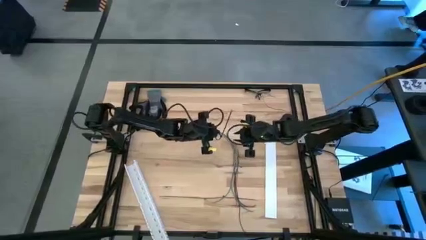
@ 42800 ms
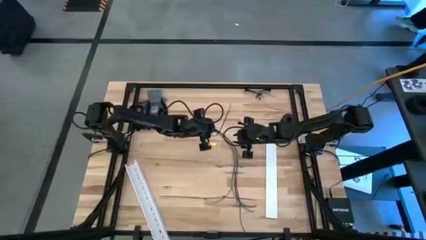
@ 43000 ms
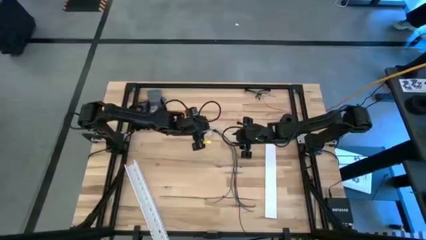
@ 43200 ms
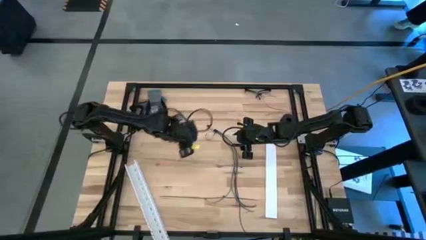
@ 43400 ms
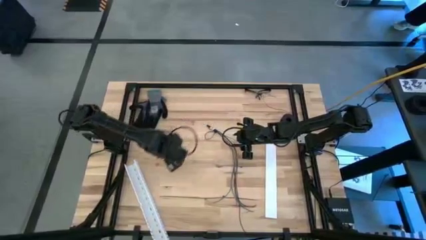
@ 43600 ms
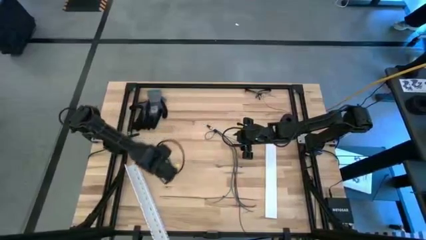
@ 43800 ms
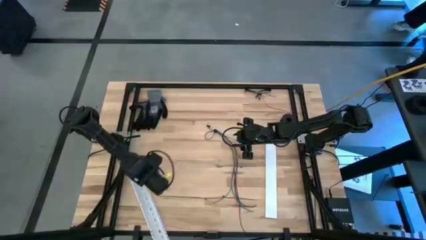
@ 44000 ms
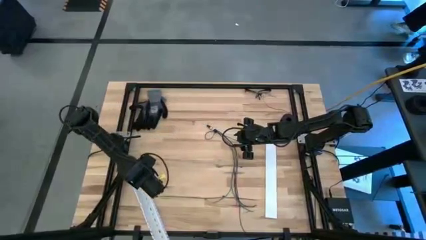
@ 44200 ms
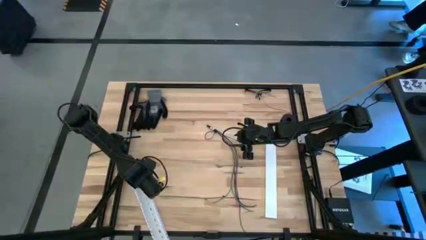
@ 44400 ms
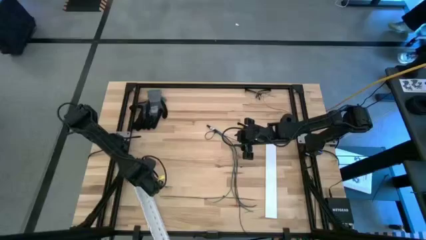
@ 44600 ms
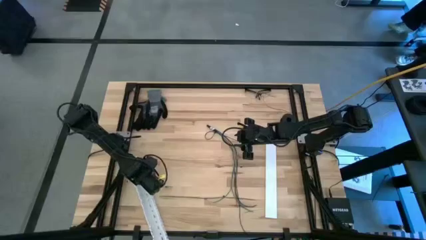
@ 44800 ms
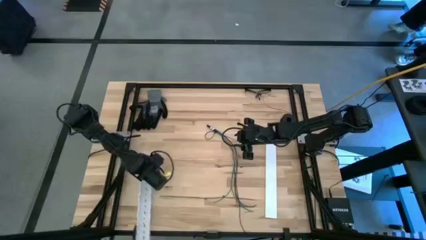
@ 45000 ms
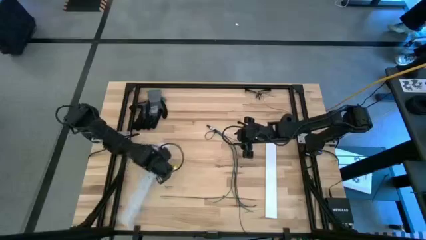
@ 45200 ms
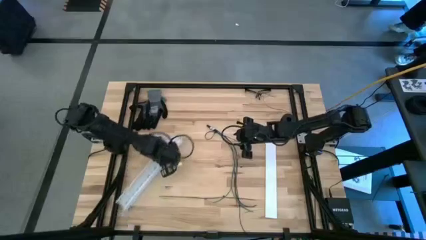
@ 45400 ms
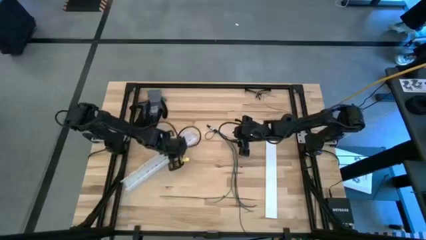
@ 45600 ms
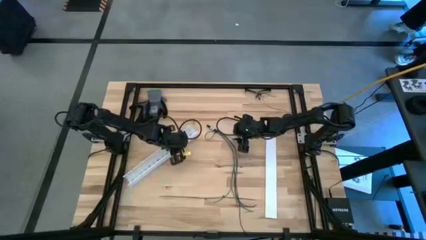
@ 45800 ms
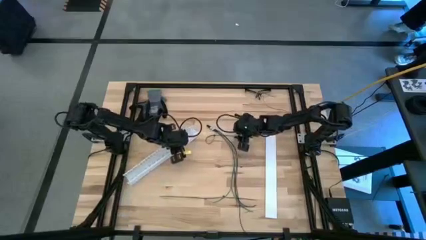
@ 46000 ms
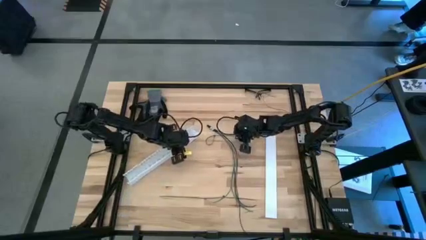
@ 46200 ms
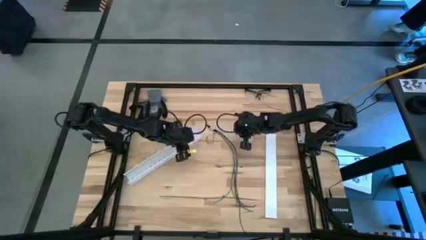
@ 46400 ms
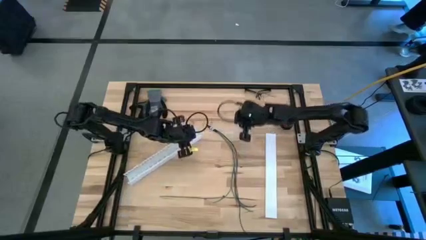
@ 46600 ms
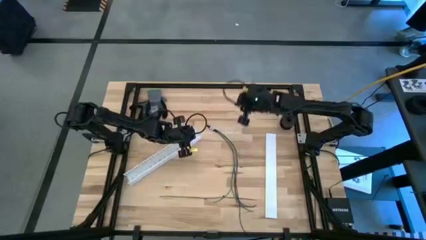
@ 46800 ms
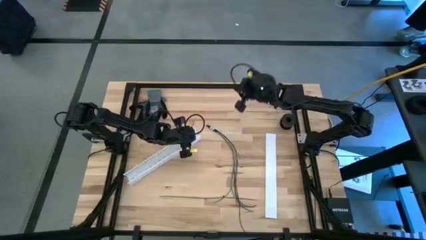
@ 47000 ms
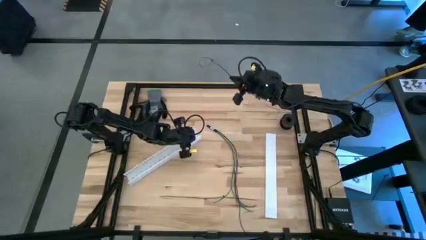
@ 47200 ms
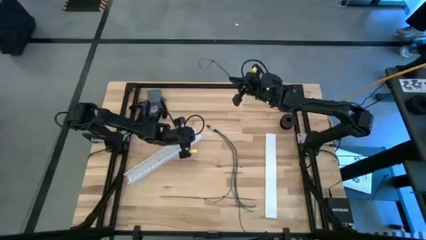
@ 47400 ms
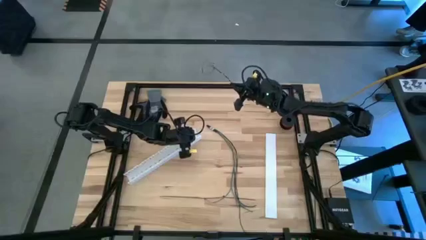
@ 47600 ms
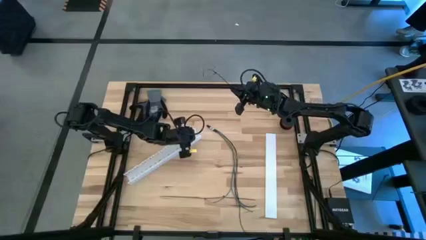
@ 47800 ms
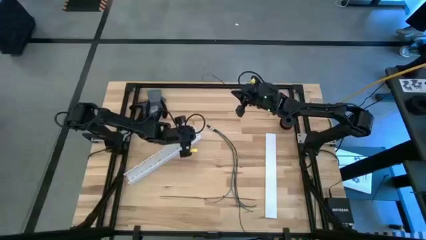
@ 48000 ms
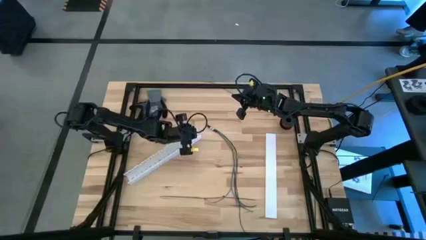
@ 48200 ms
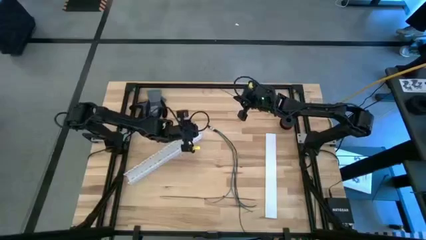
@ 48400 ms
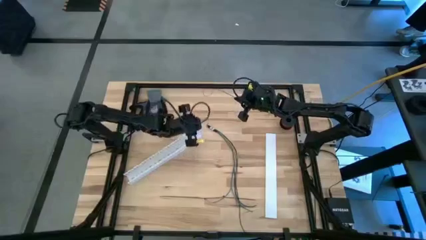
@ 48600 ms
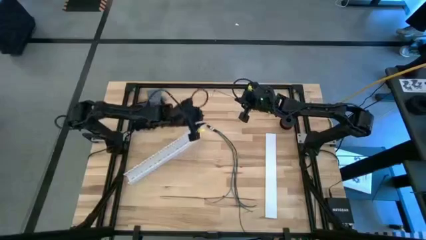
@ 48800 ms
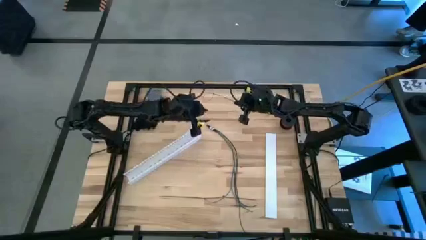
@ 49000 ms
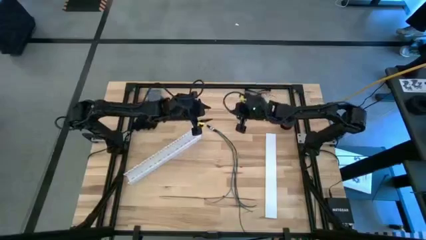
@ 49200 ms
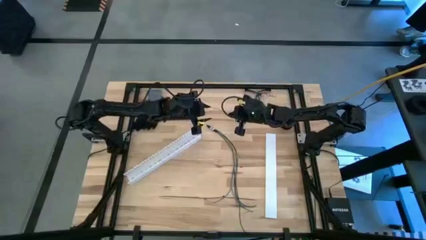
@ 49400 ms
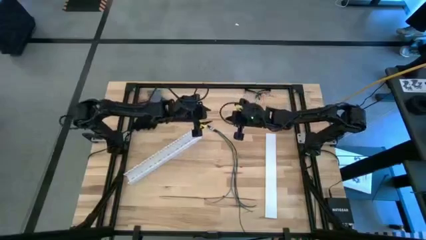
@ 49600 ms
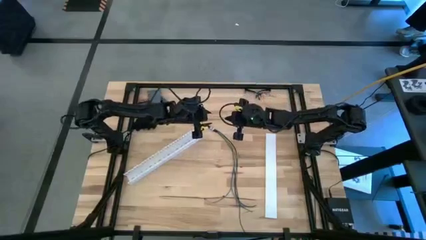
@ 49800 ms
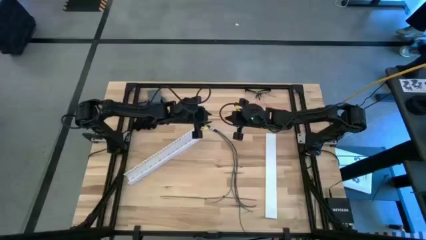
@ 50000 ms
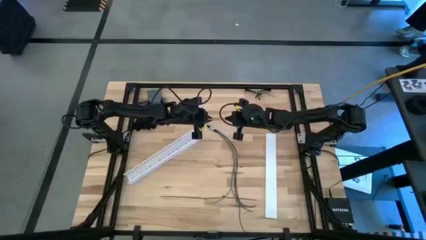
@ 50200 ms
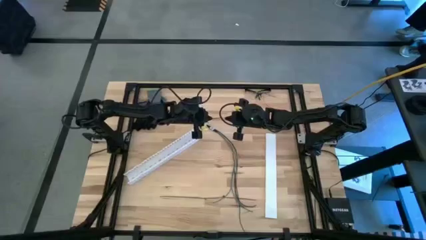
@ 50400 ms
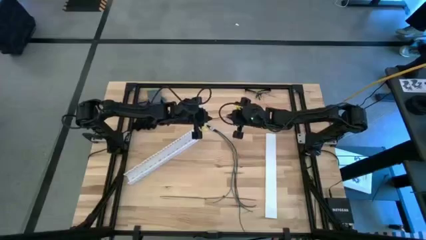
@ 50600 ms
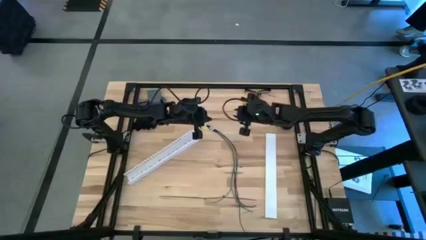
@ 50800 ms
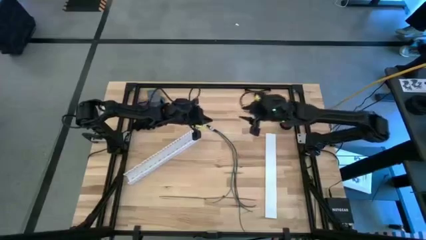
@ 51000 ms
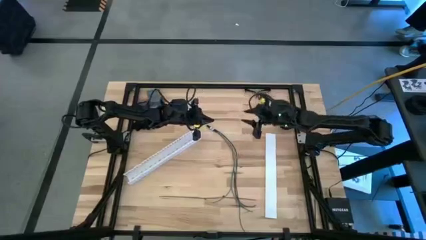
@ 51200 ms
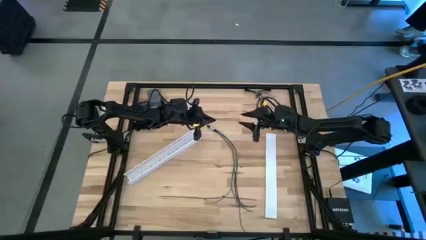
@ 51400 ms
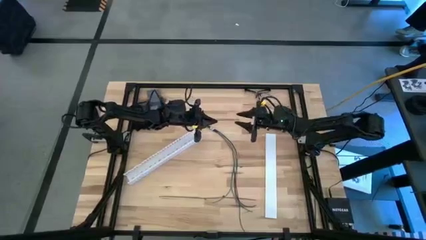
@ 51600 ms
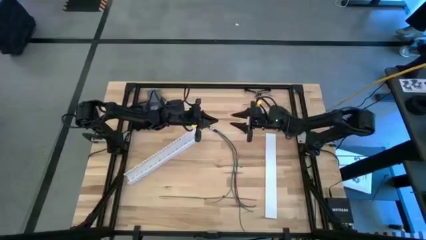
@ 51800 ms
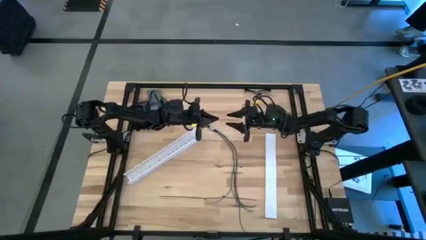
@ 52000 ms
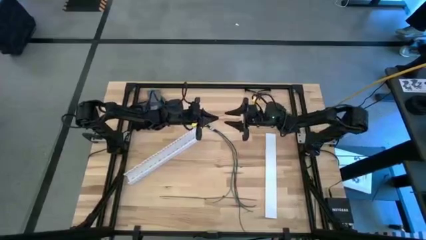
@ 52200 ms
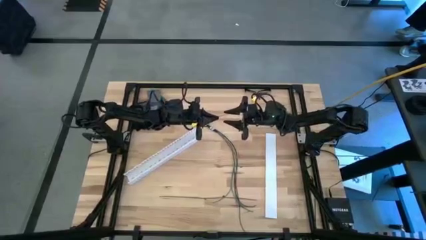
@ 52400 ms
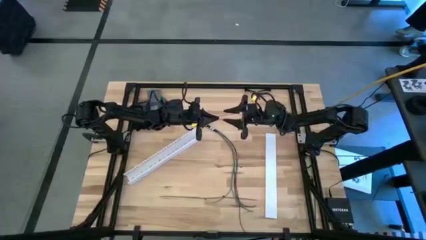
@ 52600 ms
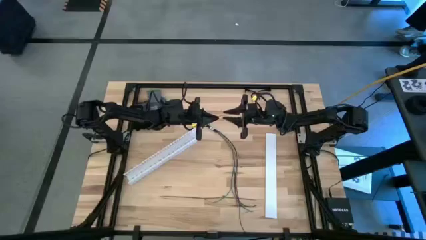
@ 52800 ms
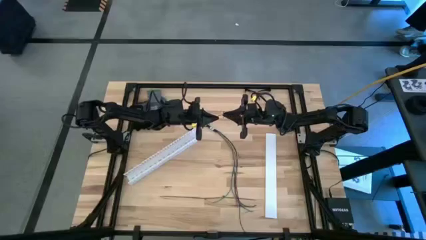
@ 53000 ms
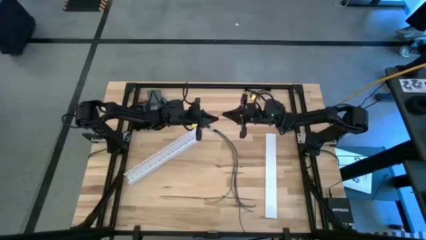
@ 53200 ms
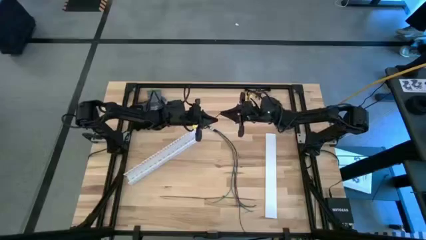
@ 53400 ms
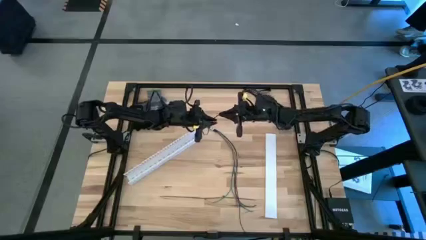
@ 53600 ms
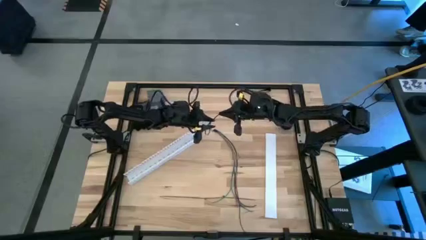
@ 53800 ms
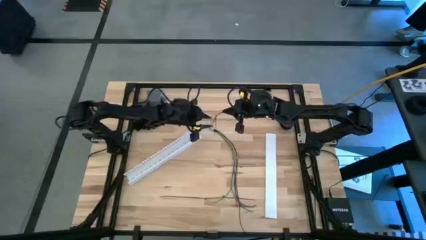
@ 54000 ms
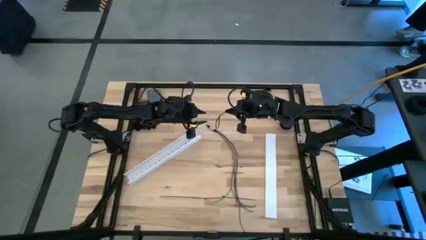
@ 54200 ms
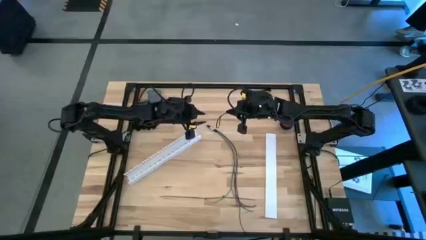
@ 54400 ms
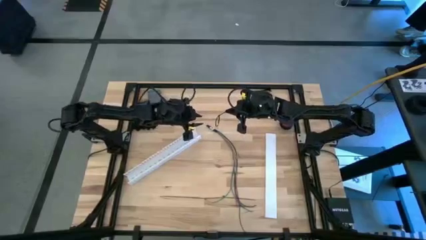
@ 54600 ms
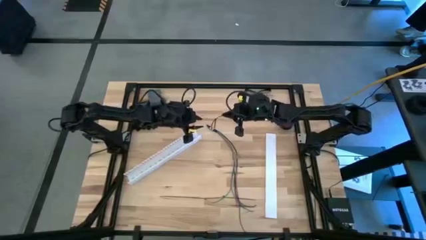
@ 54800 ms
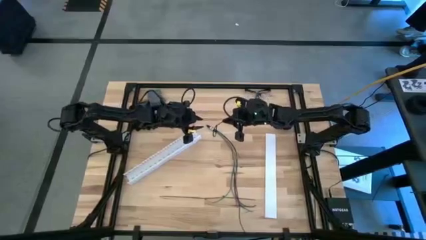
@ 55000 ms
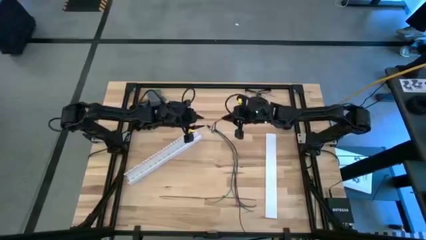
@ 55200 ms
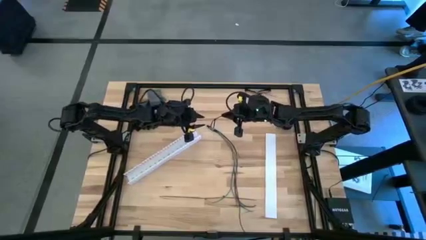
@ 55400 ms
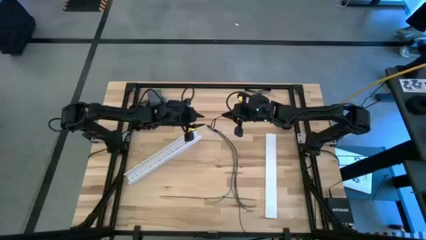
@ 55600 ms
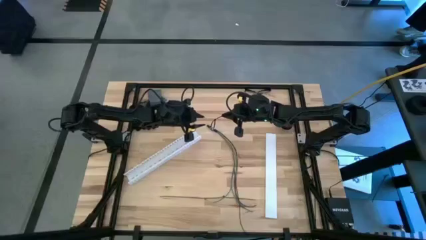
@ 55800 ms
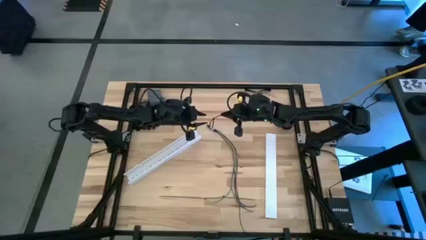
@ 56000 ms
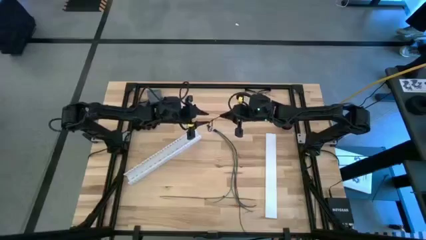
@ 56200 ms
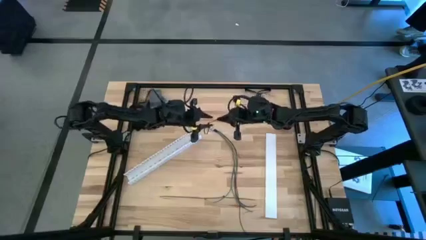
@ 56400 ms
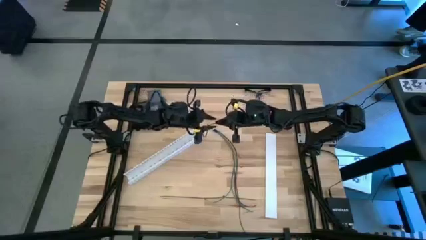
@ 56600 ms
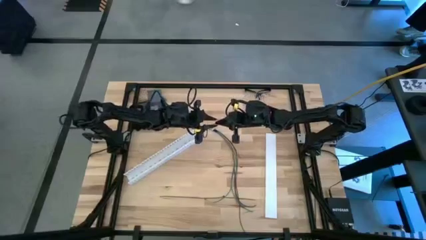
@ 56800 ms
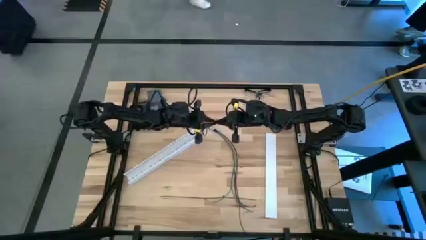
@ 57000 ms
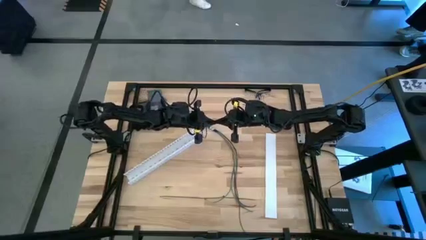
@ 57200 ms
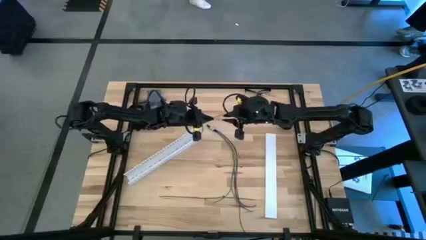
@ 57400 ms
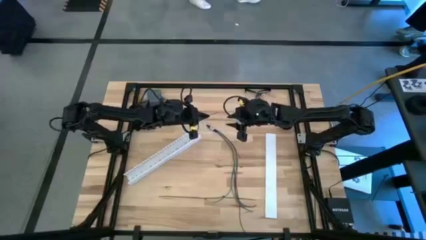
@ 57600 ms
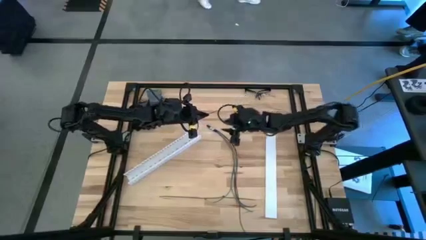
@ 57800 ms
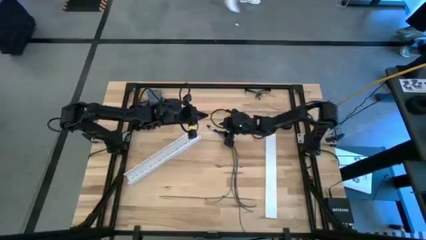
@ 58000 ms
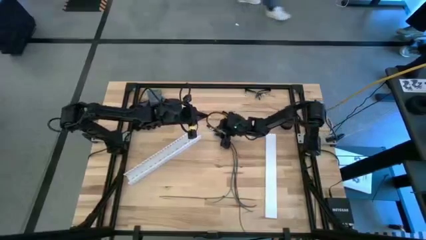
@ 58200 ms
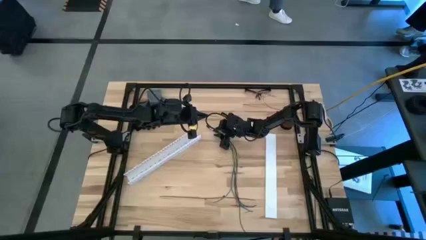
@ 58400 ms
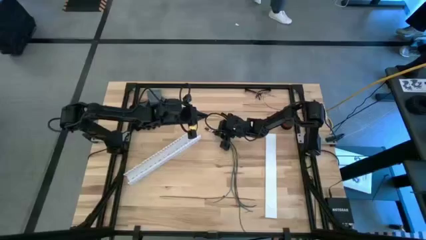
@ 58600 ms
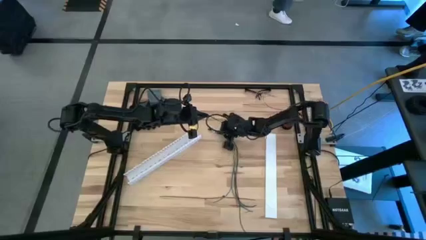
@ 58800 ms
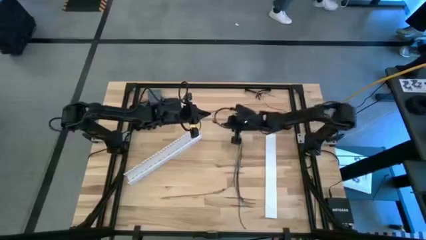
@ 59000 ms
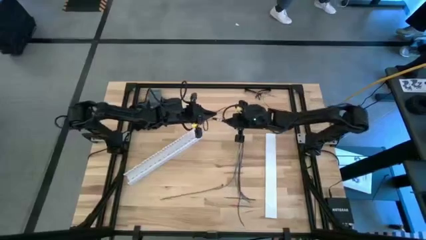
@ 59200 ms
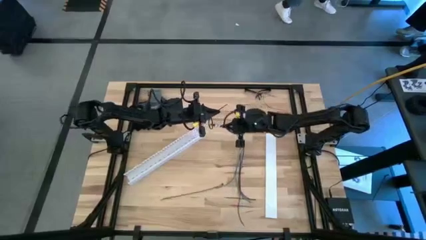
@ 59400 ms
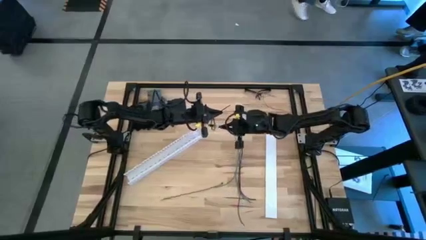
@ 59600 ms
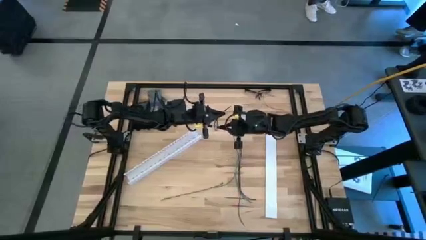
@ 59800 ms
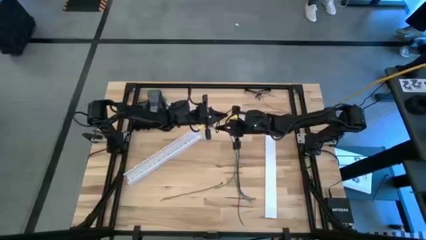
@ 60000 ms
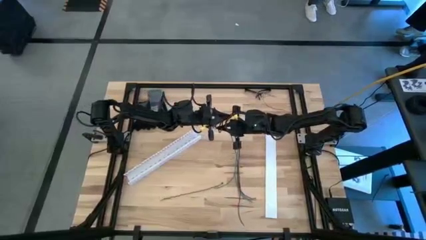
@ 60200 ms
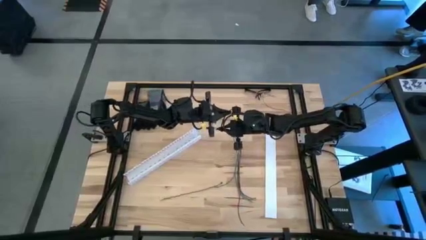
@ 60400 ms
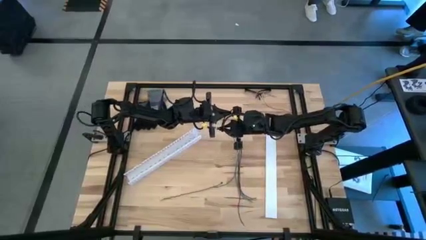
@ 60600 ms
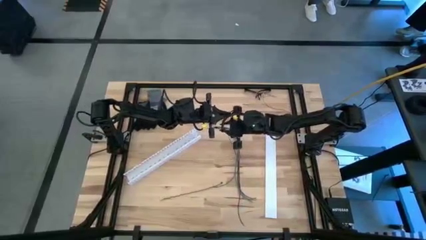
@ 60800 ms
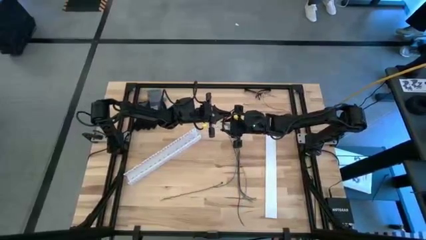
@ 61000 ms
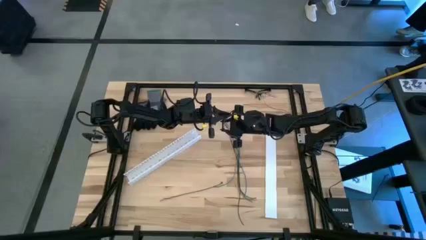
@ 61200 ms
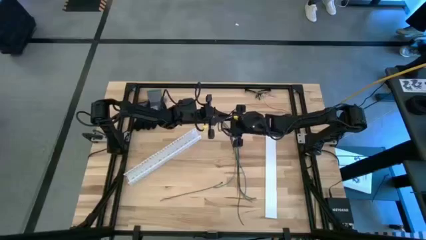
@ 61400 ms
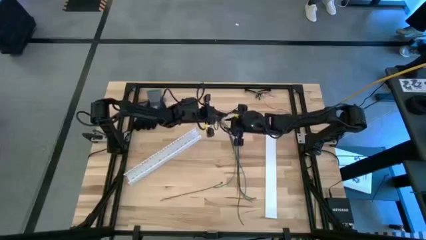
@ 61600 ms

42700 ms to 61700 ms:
Task: Ziptie cables
Wrap the top black zip tie on the colored cables
